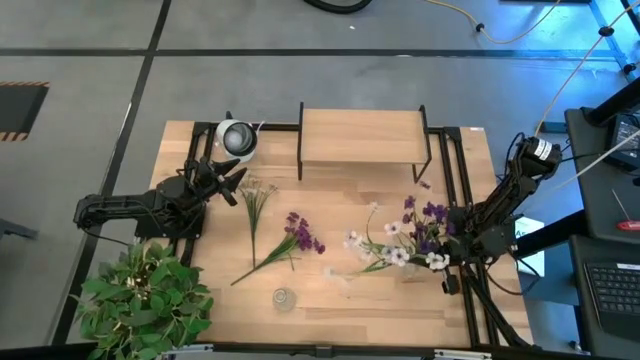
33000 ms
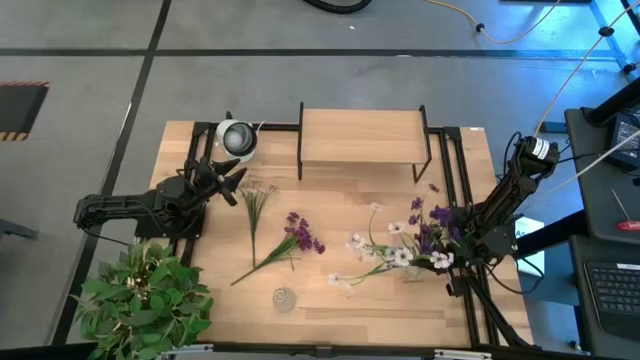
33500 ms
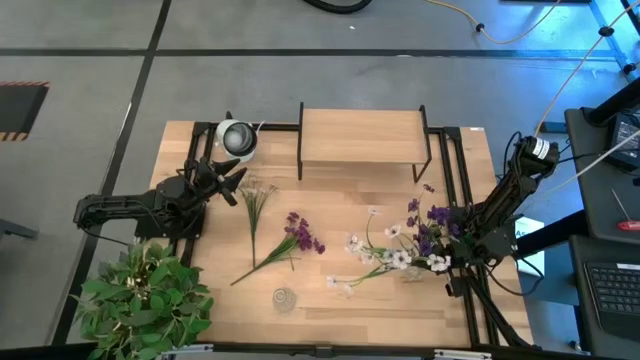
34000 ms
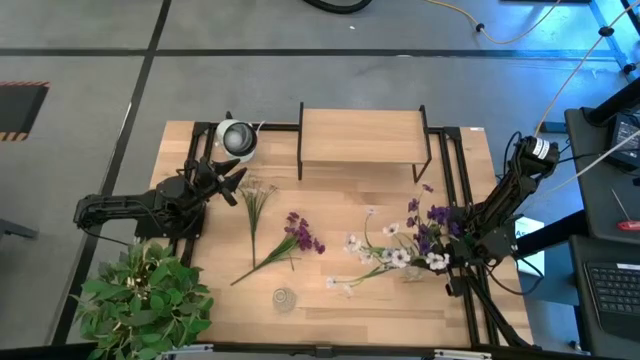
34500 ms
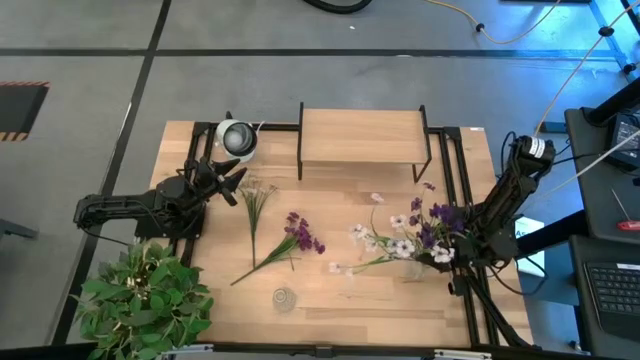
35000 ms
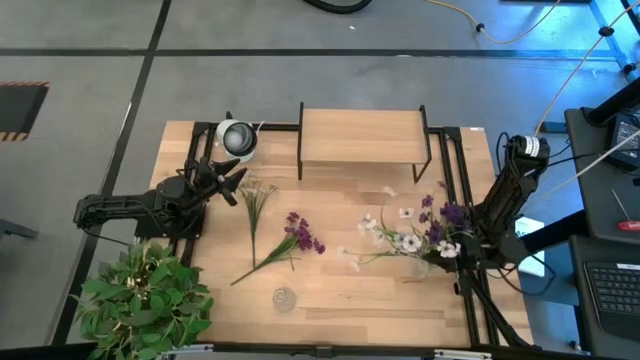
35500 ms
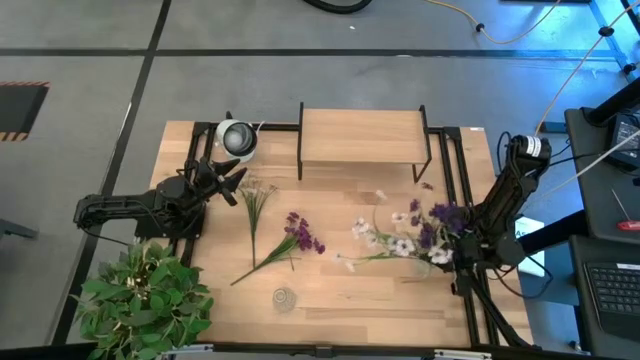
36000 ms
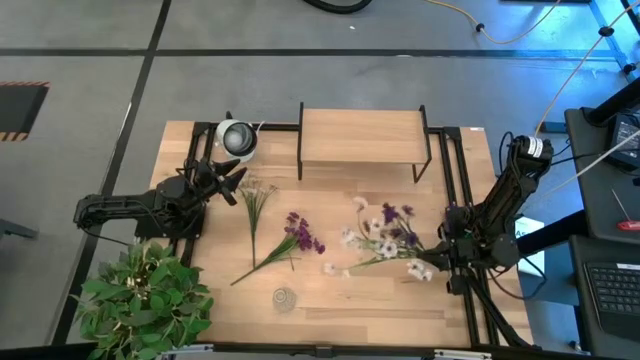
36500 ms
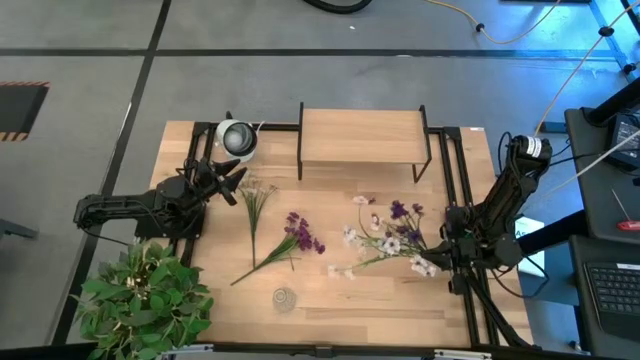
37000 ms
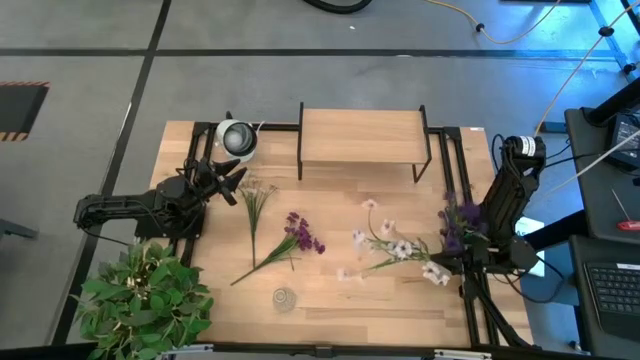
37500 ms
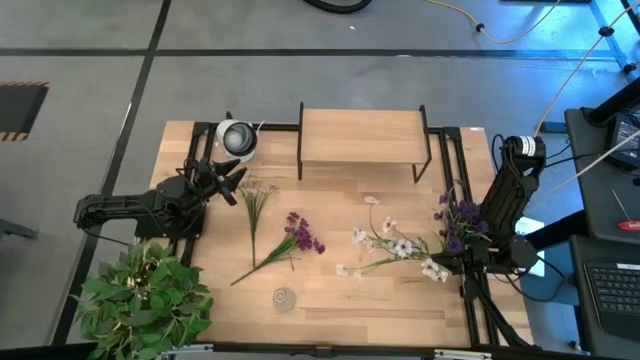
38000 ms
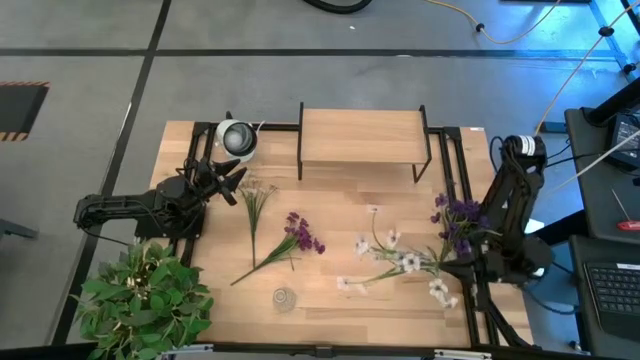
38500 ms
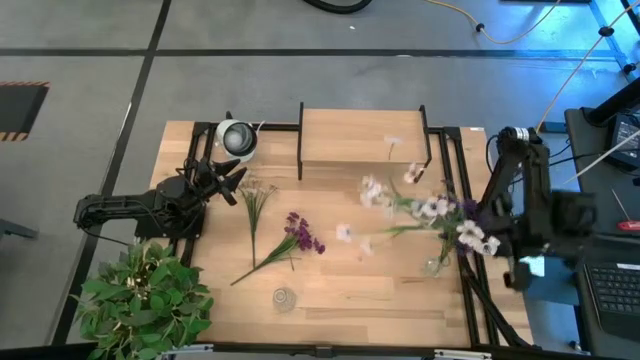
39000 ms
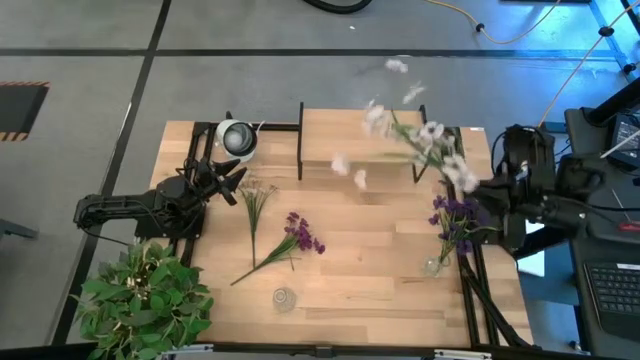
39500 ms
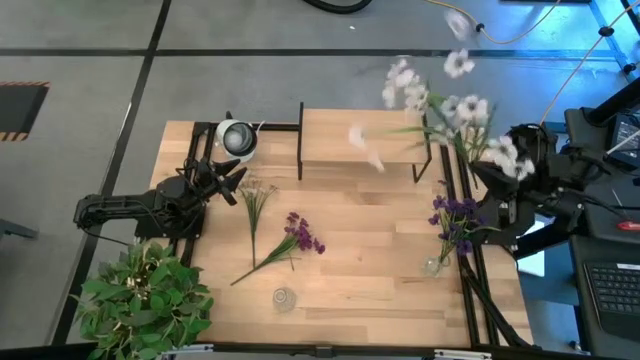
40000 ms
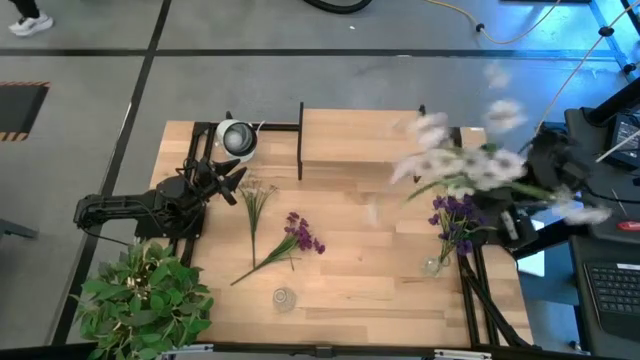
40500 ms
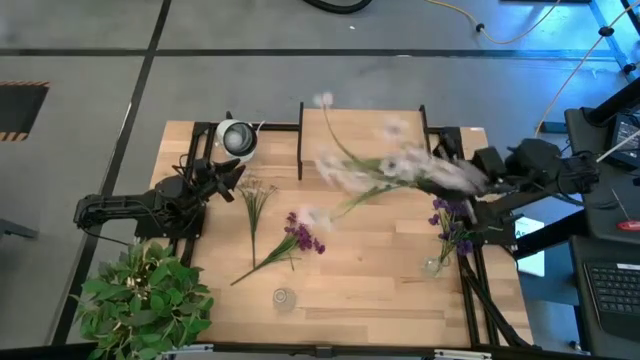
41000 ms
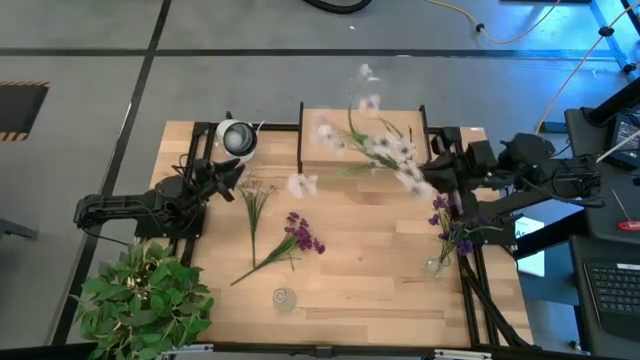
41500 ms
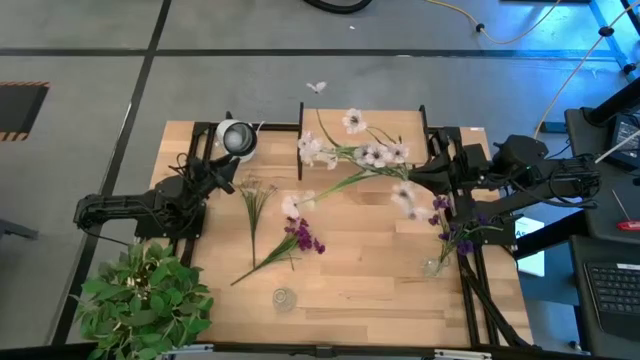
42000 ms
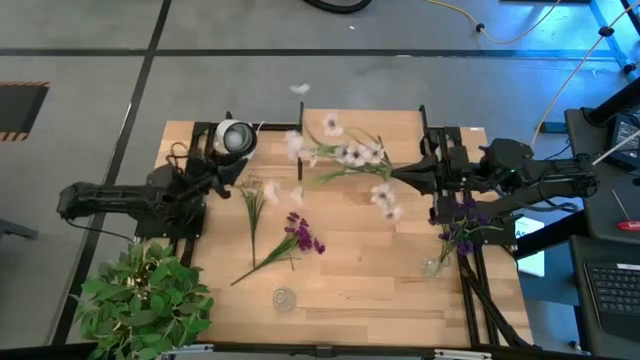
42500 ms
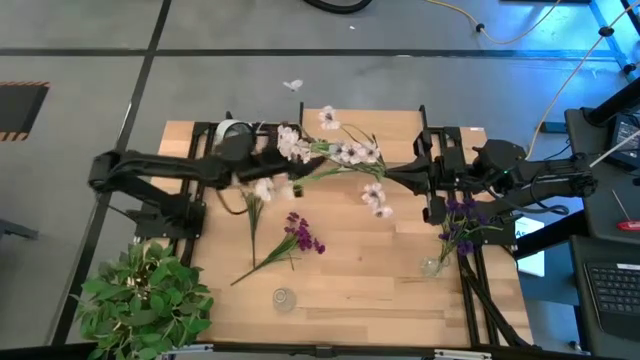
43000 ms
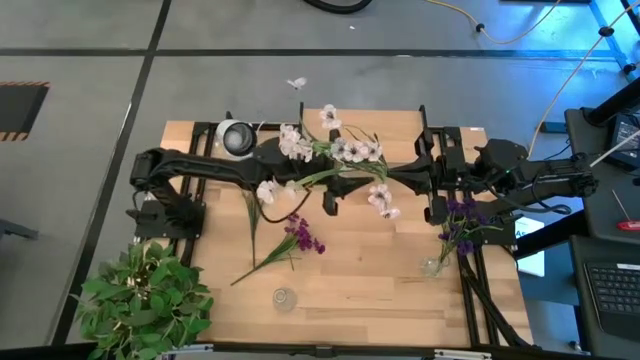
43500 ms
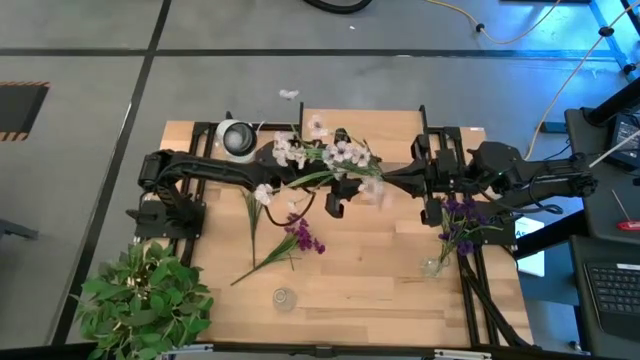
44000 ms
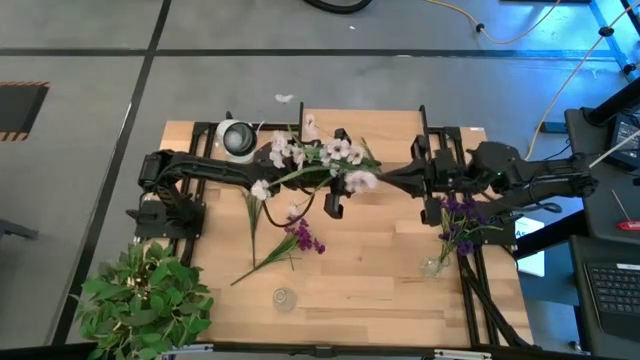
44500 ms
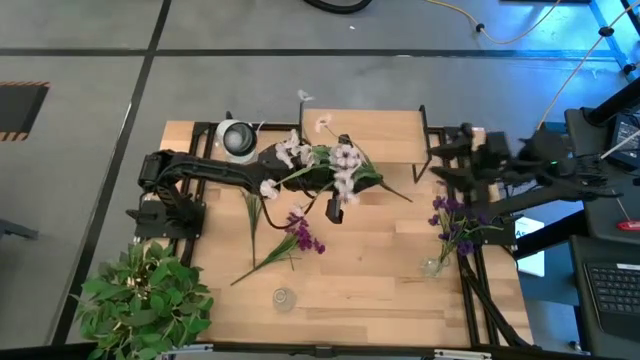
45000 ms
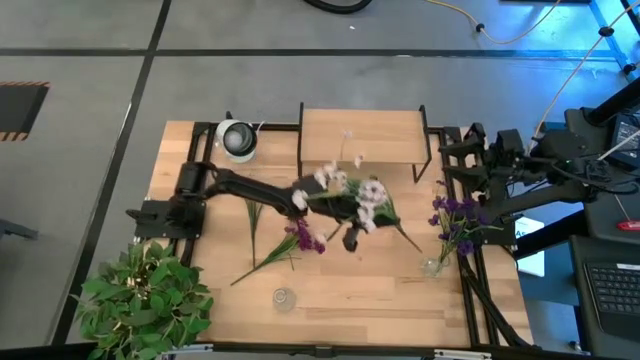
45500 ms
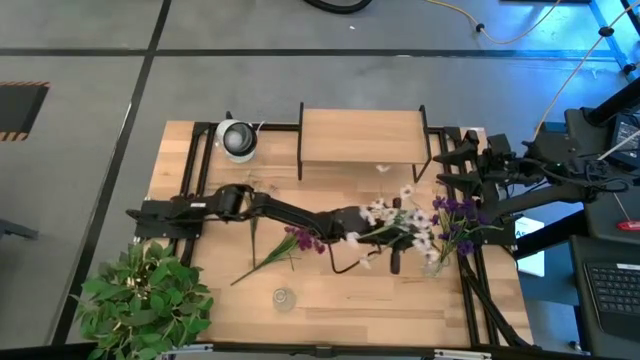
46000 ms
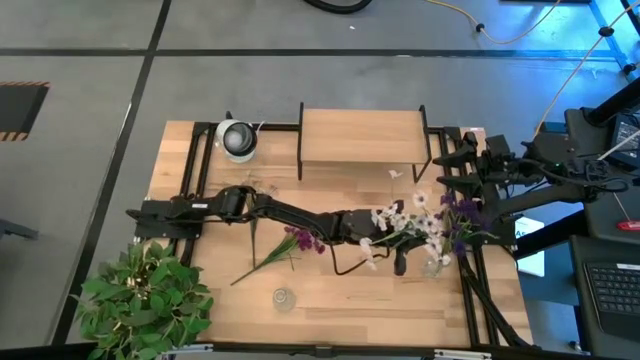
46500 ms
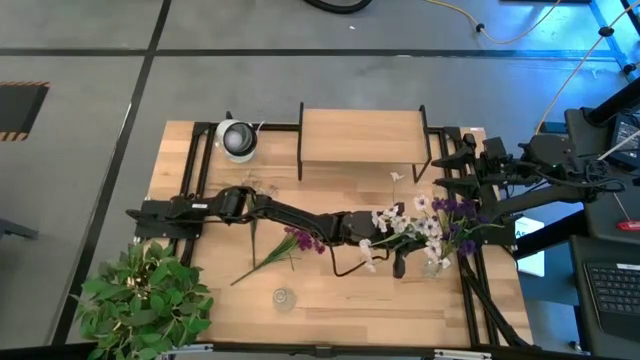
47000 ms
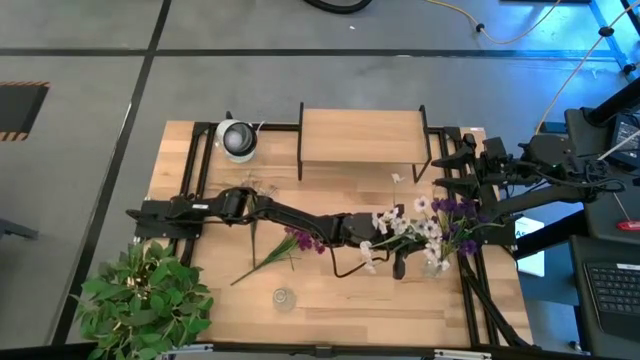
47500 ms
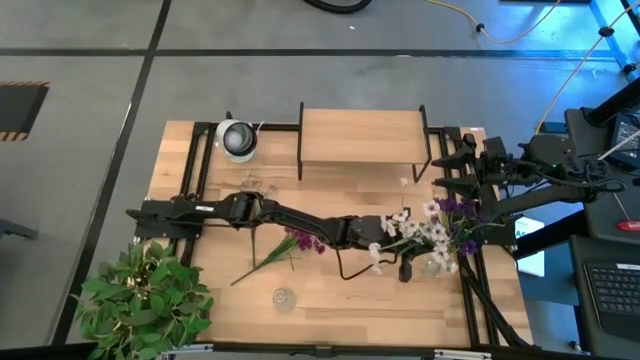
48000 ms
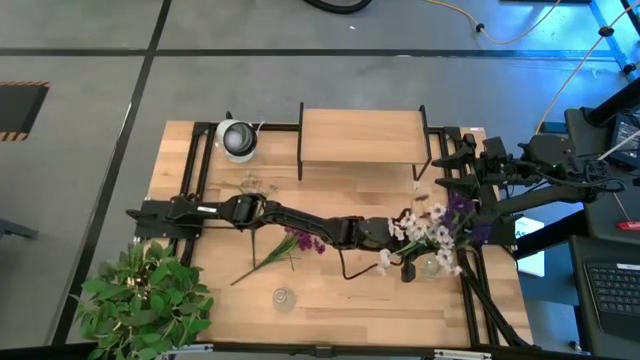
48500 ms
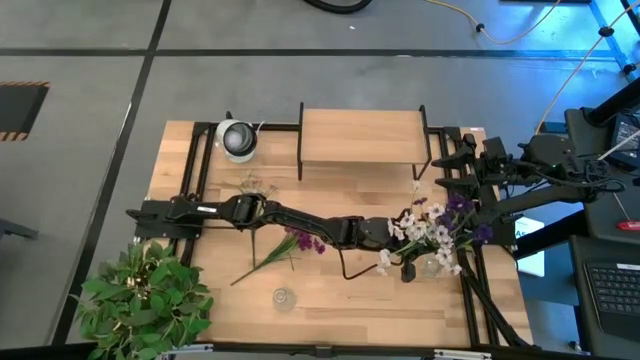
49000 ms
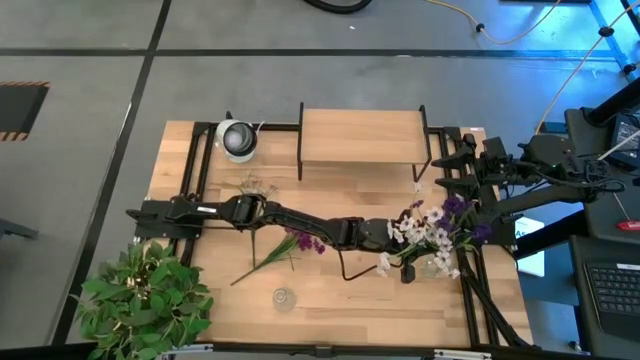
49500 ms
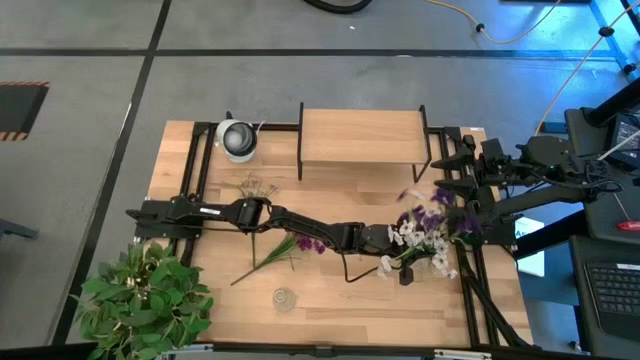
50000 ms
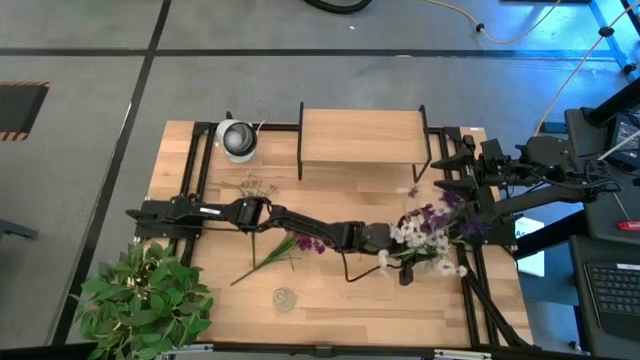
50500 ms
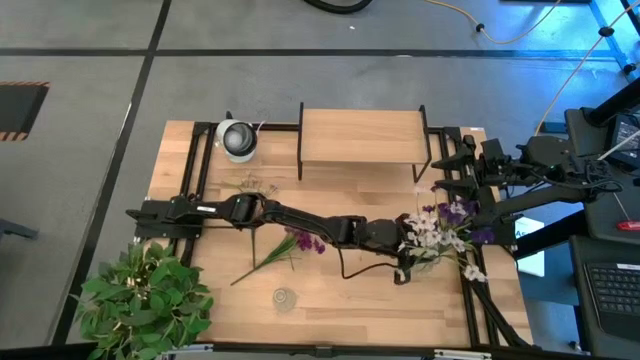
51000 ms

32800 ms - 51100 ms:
Task: Pick and place flowers into a vace then onto a shelf
Put the bottom white flowers into the right transparent vase
